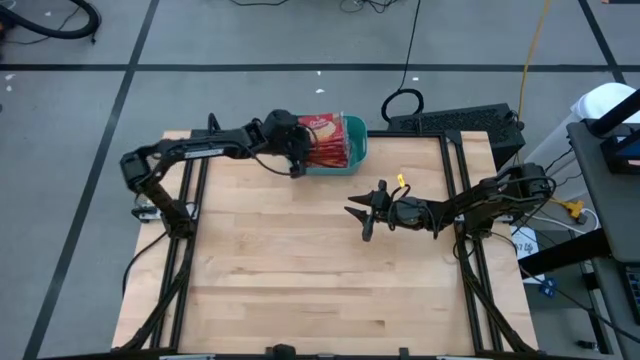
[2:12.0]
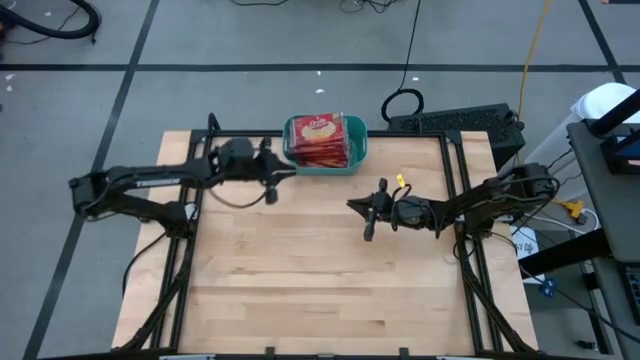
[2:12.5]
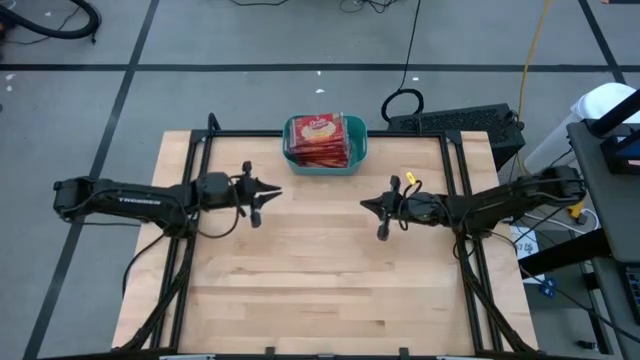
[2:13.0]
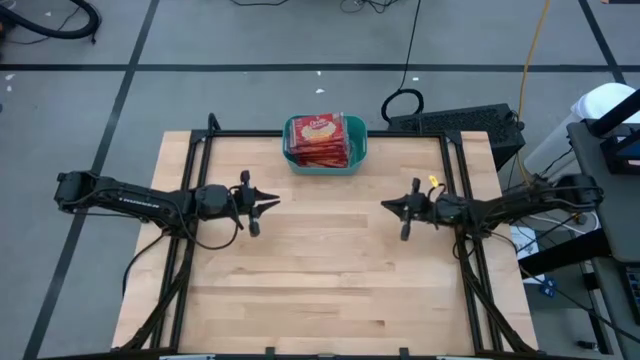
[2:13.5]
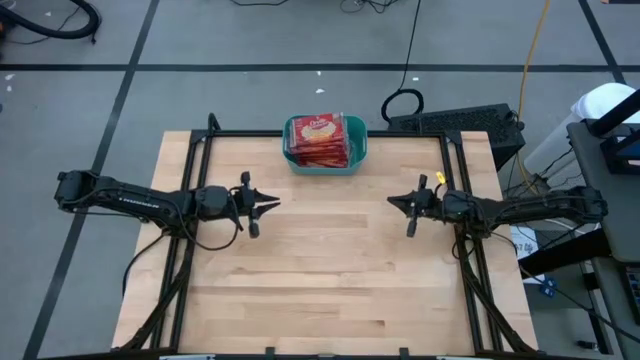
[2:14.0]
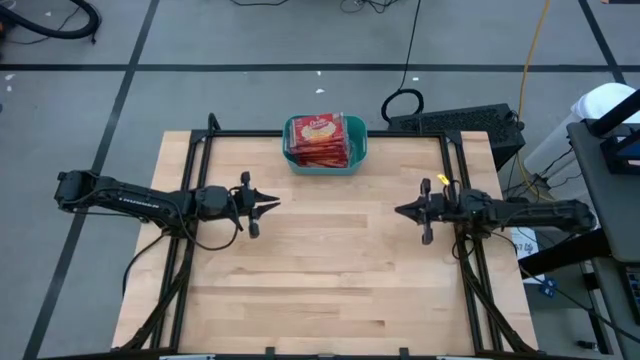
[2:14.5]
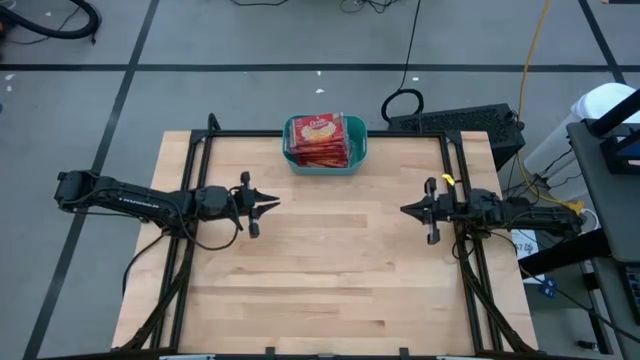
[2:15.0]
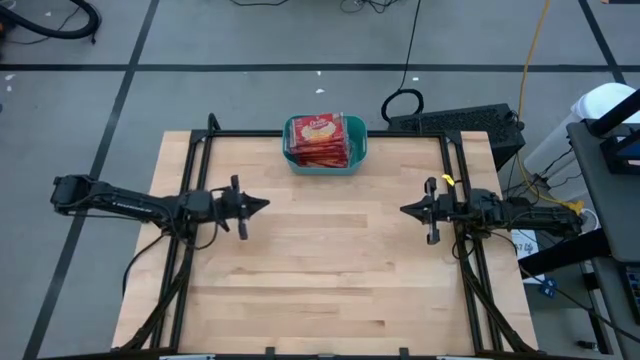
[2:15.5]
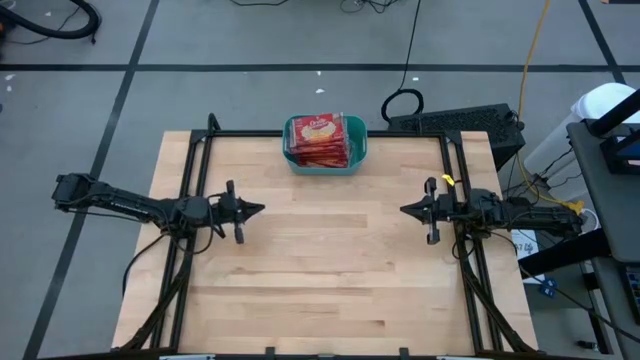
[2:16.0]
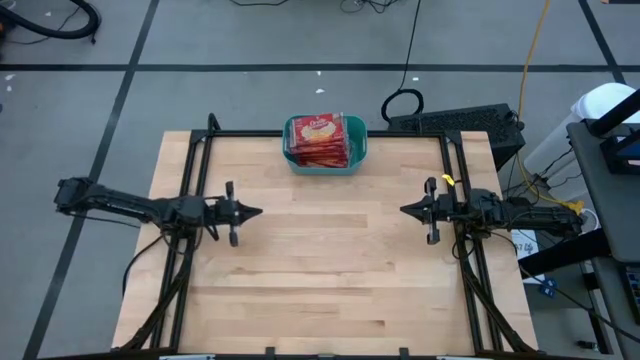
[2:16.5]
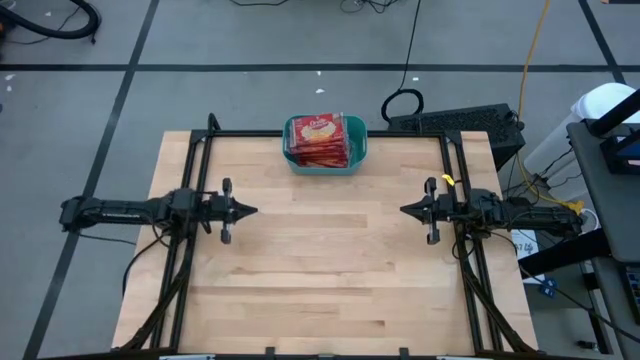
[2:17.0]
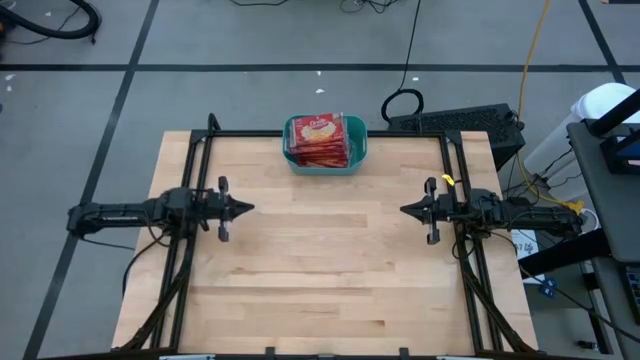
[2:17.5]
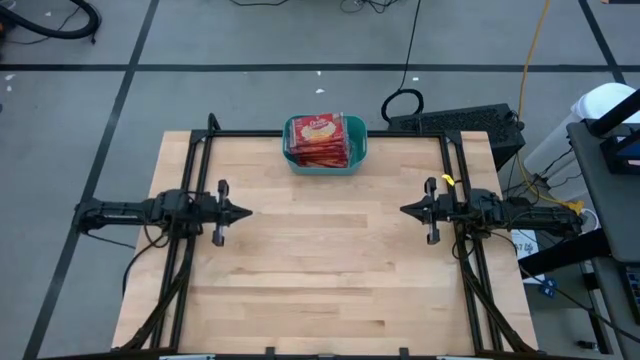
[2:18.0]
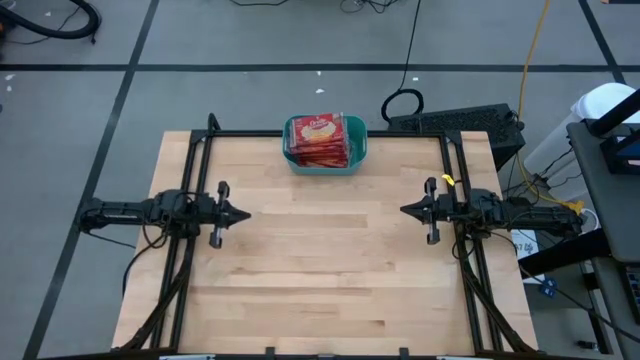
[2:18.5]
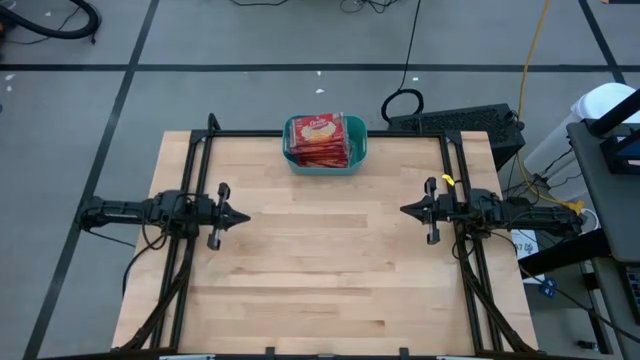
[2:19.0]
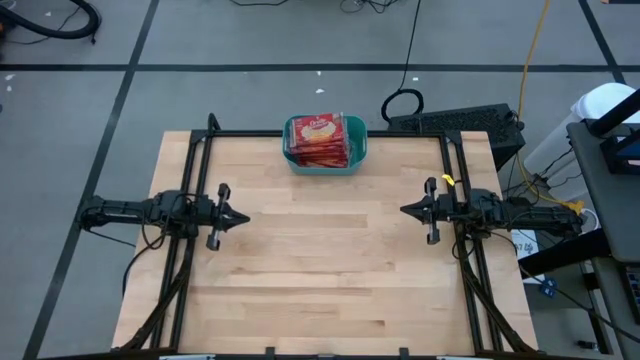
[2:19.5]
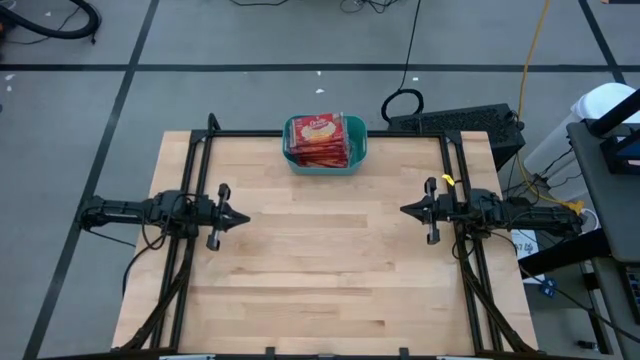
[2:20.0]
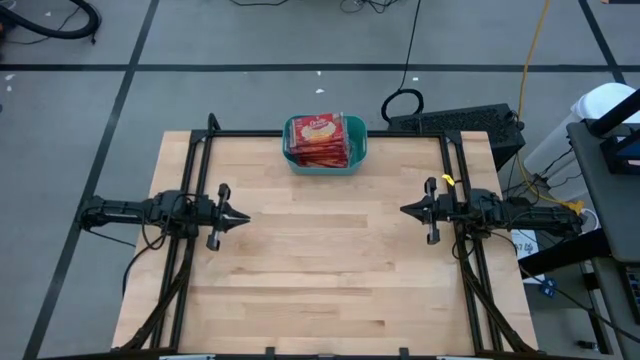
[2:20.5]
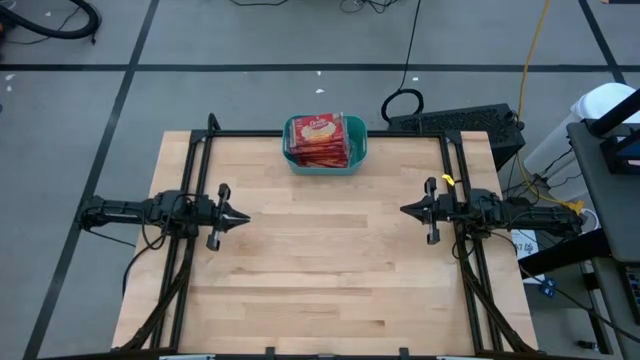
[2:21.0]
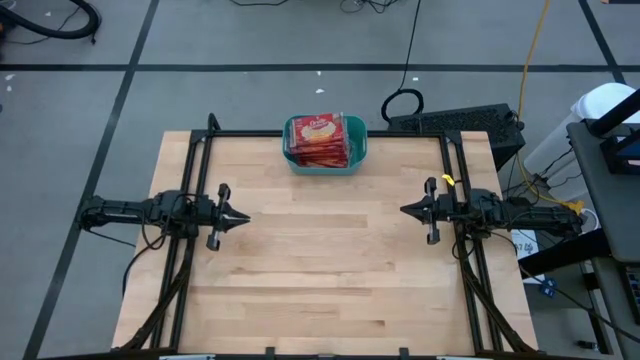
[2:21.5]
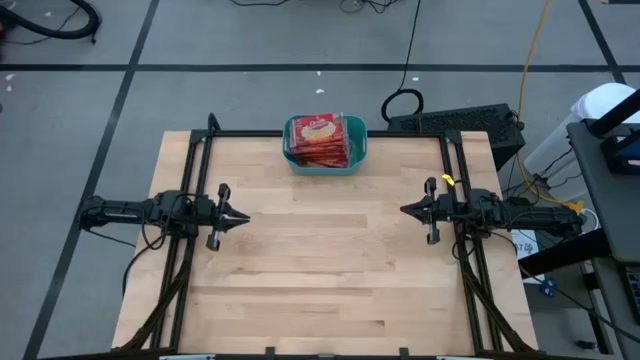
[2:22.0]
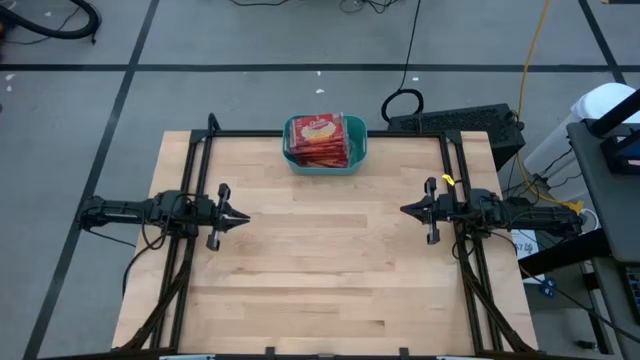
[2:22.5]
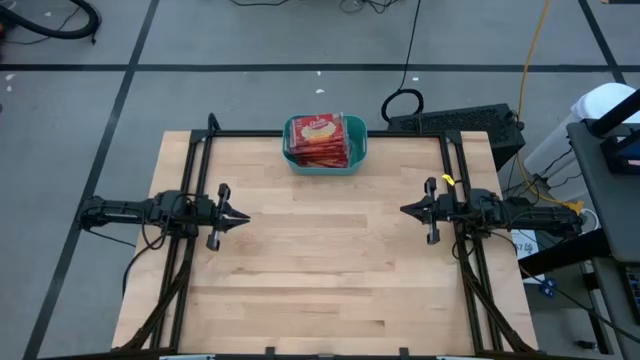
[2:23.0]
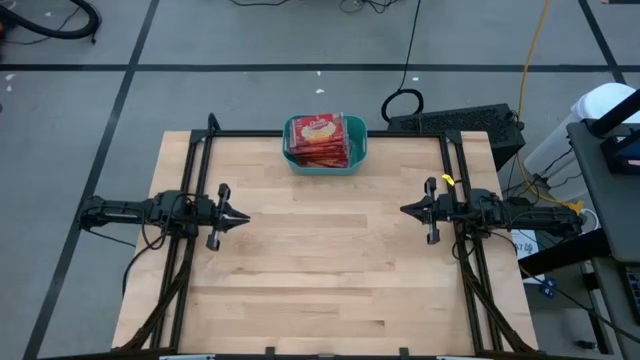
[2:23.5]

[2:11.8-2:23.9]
Task: Sort popcorn bags into baskets
Return to Home Position

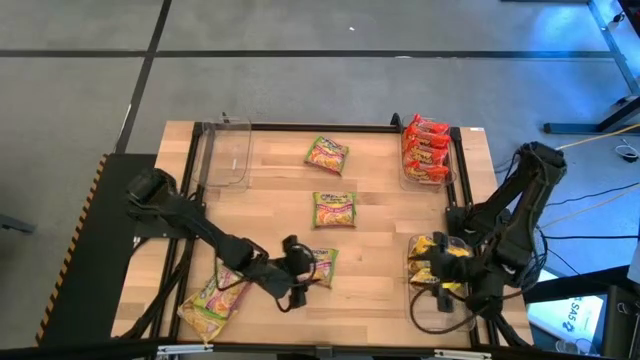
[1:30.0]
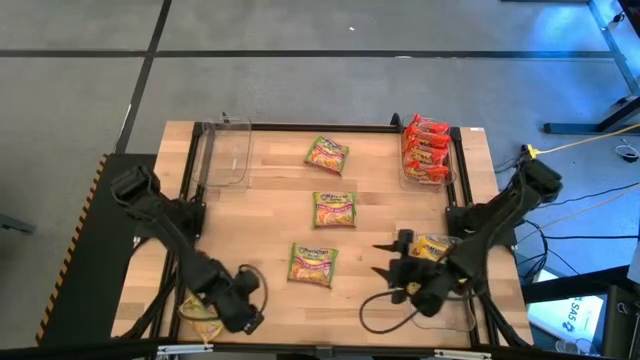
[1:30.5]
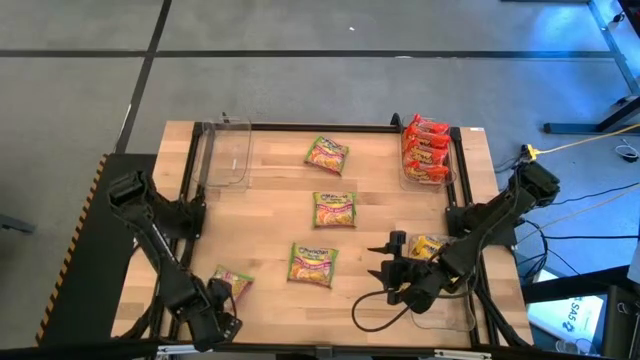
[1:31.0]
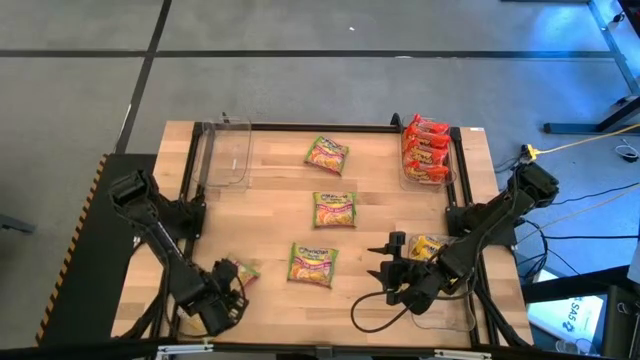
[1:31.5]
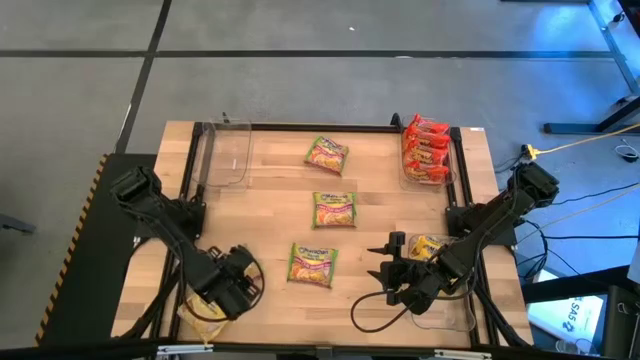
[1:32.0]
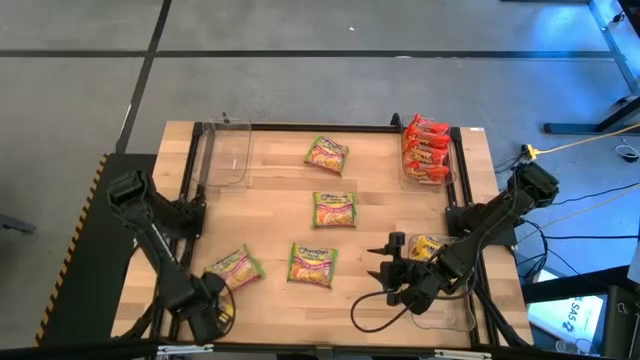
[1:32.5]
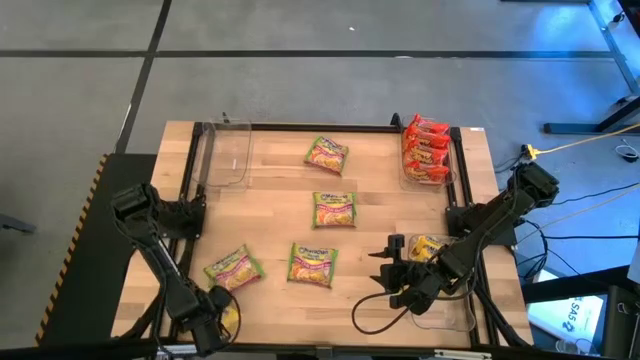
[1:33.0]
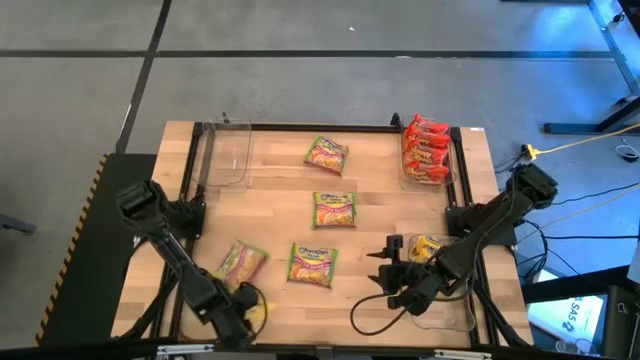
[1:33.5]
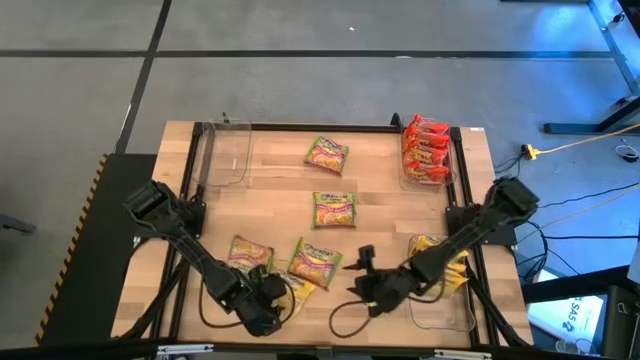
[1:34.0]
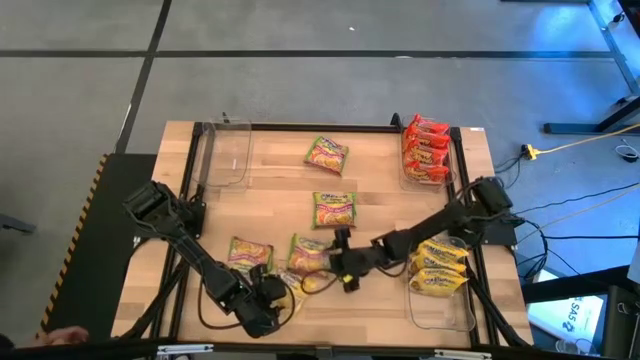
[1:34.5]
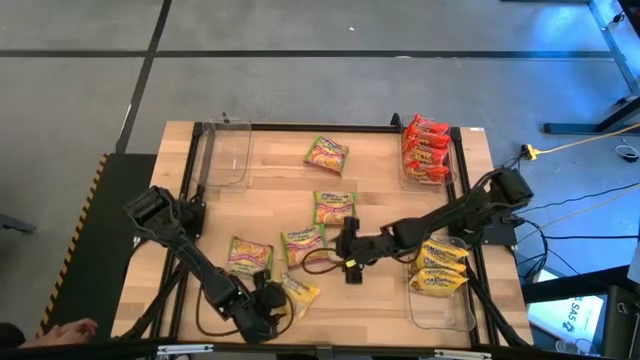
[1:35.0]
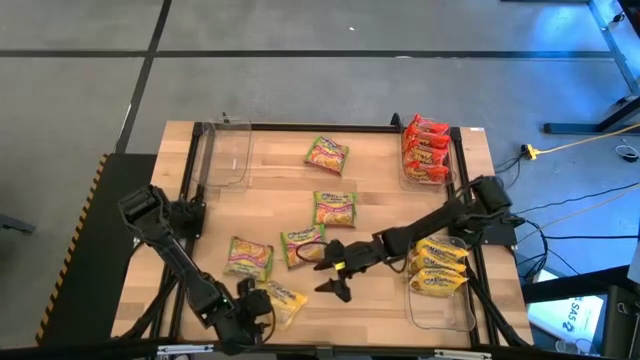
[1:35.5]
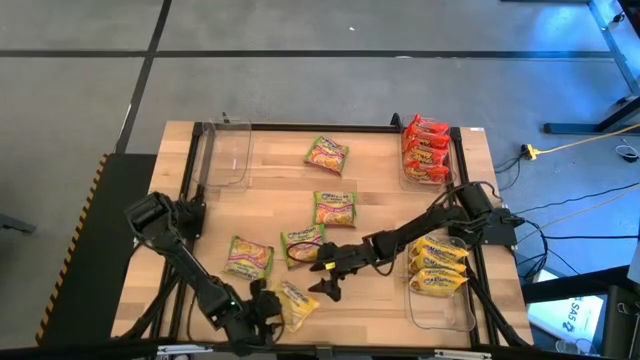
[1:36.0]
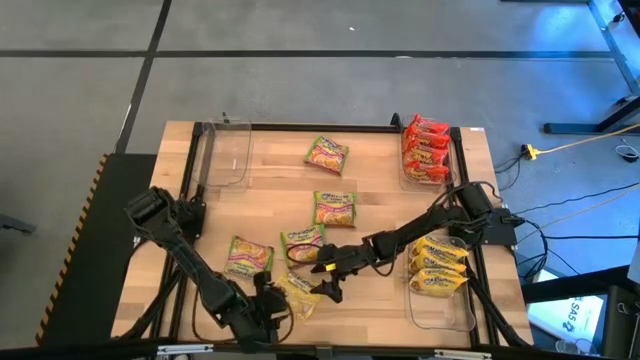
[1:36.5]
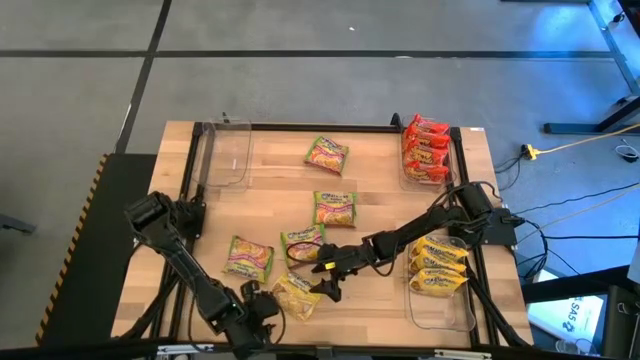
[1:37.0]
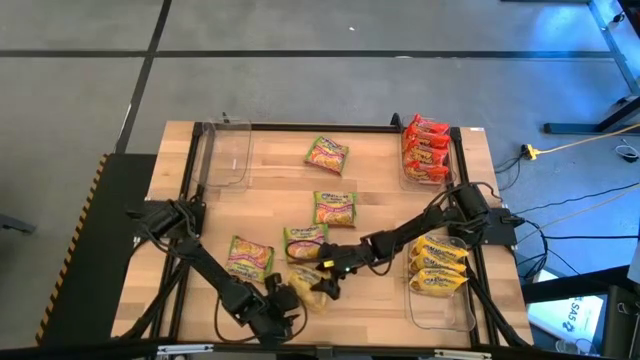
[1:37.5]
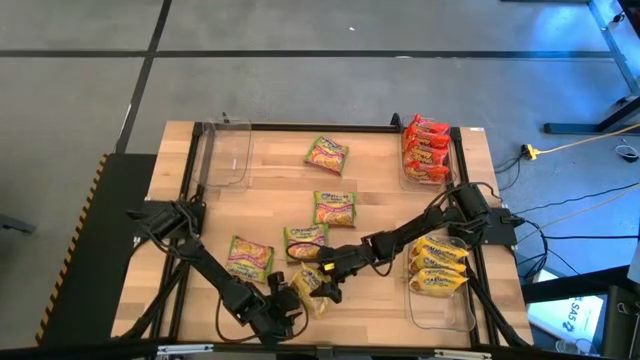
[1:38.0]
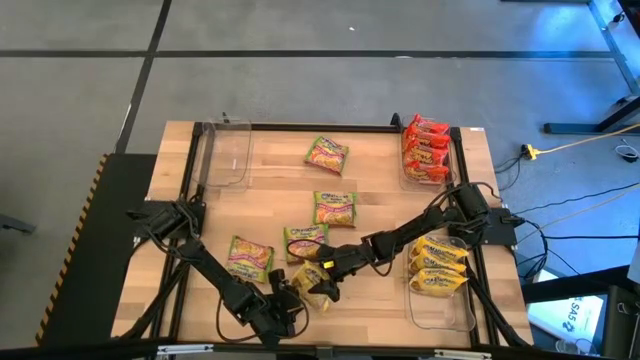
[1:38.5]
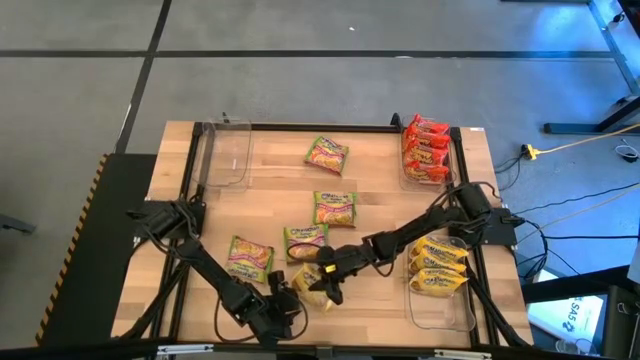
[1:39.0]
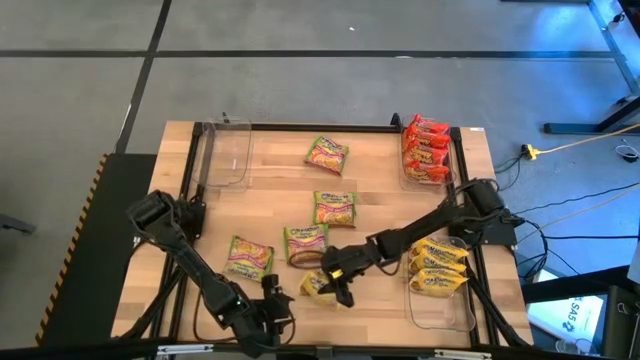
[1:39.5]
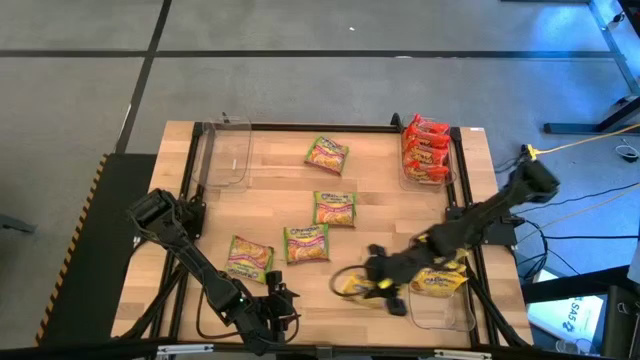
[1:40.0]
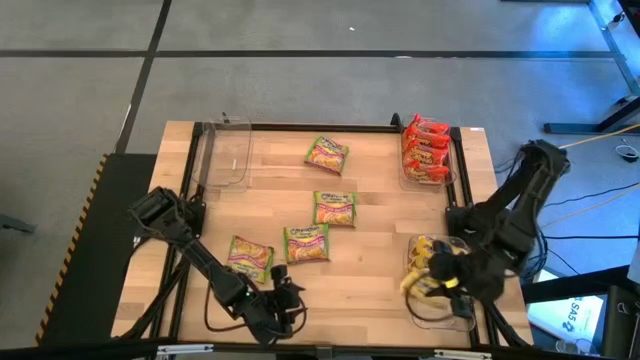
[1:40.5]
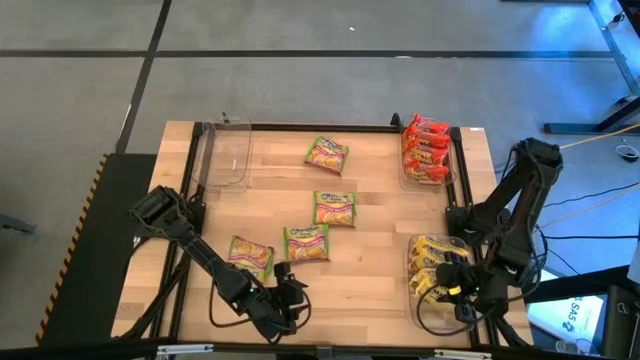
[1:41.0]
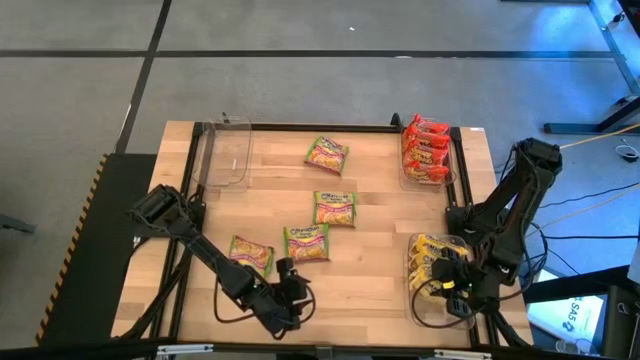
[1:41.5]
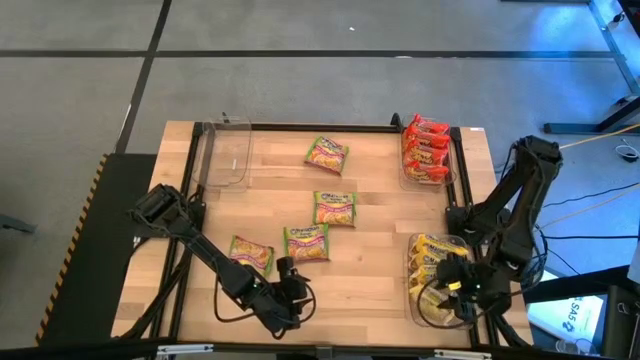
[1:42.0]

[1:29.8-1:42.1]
Task: Sort Maruchan noodles
Put the yellow noodle pack into the bottom transparent bin
